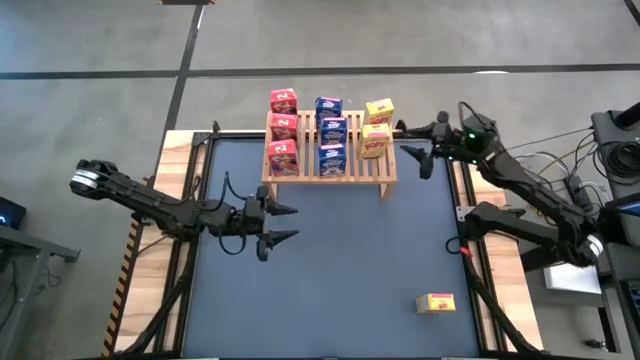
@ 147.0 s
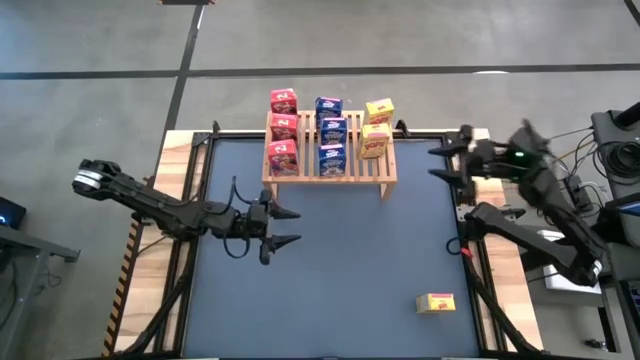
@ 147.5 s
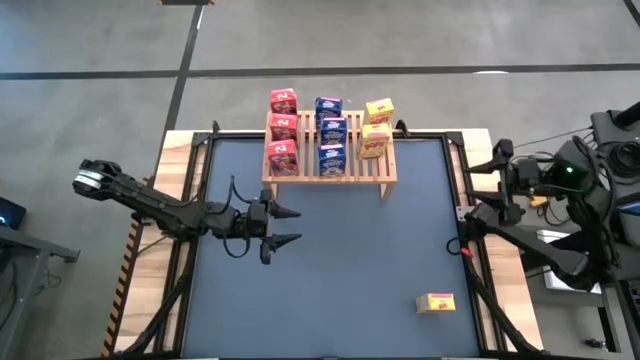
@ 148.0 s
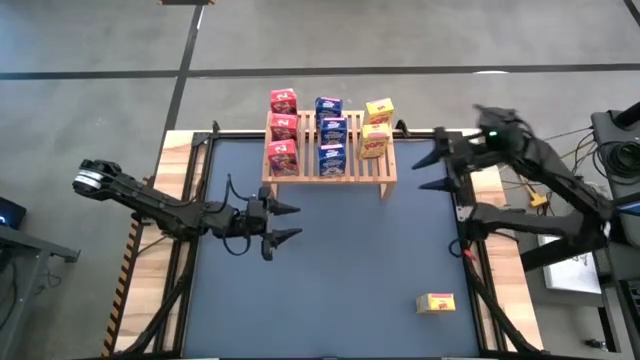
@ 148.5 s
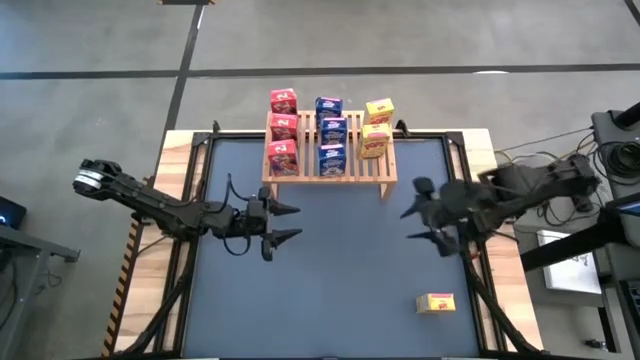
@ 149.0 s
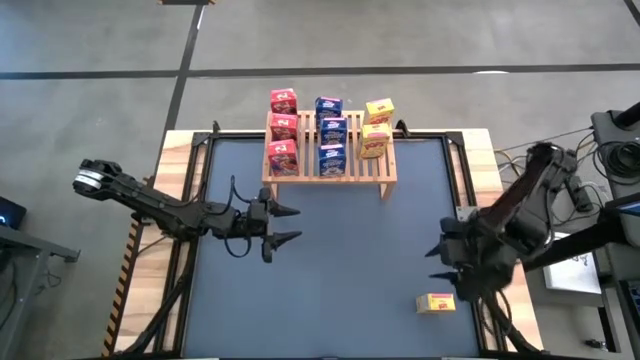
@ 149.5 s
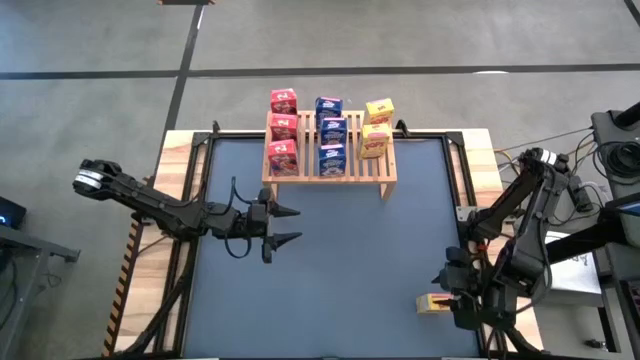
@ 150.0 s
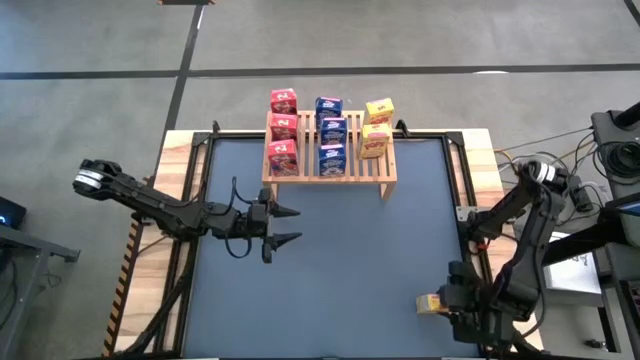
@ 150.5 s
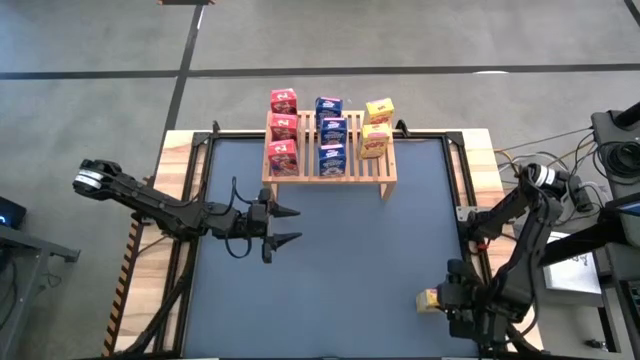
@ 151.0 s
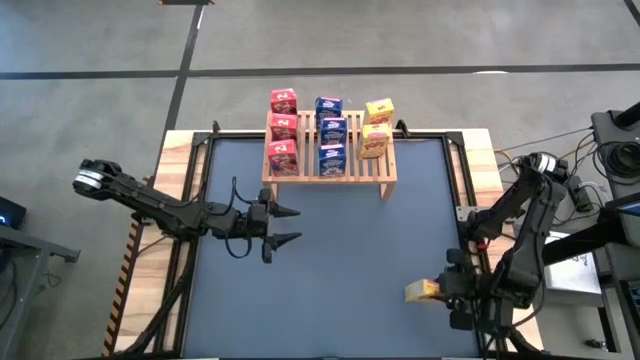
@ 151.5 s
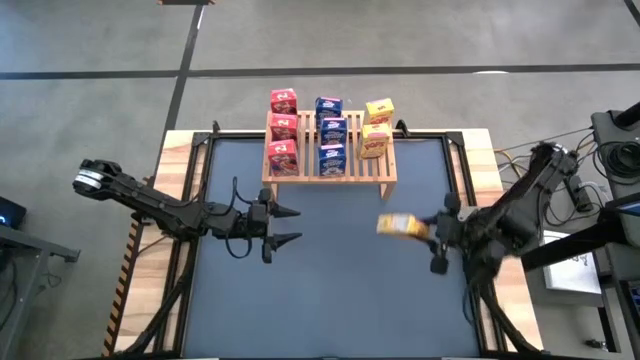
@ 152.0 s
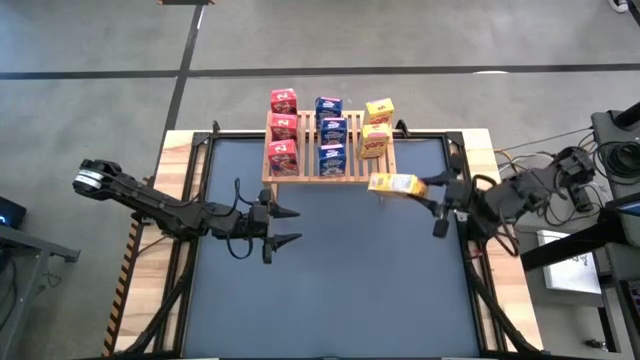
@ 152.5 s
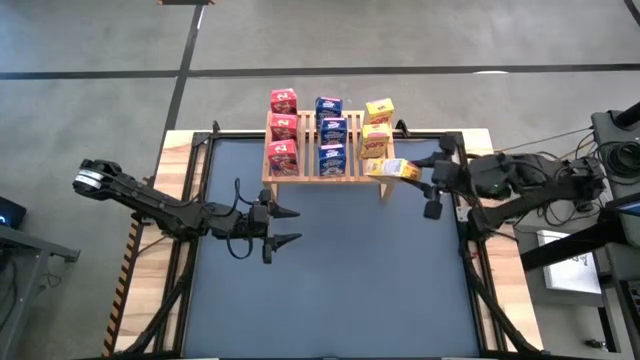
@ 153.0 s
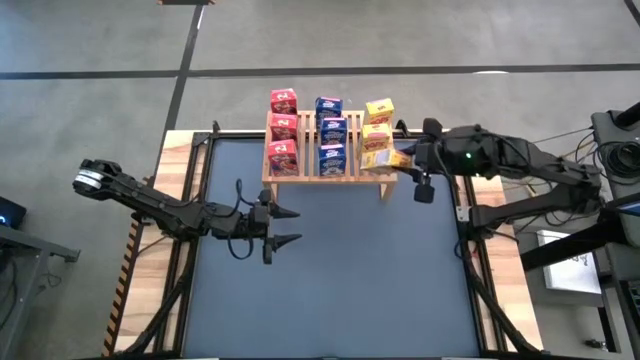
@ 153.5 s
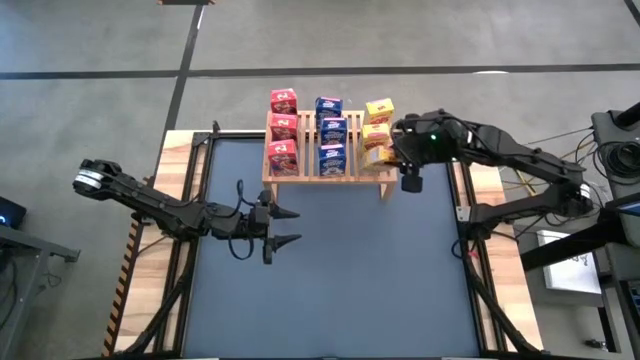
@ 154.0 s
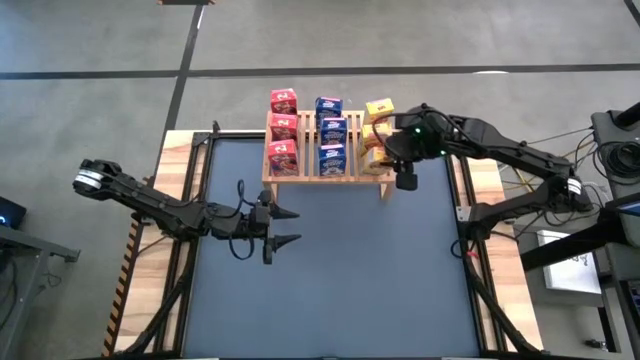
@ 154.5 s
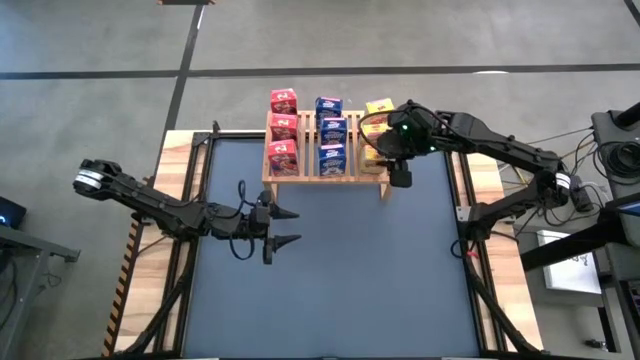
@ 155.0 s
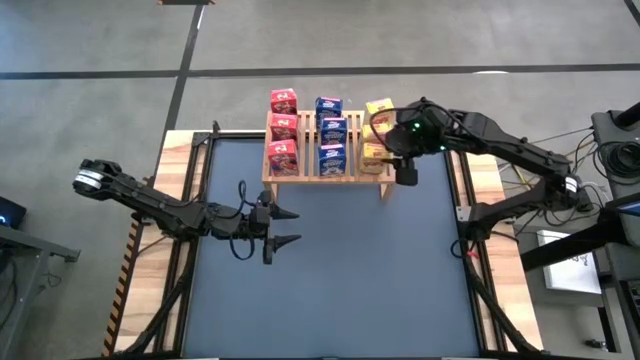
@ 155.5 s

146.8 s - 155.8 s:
Task: Stack cereal on shelf
Put the yellow cereal box aligned with the other yellow cereal boxes on the shelf

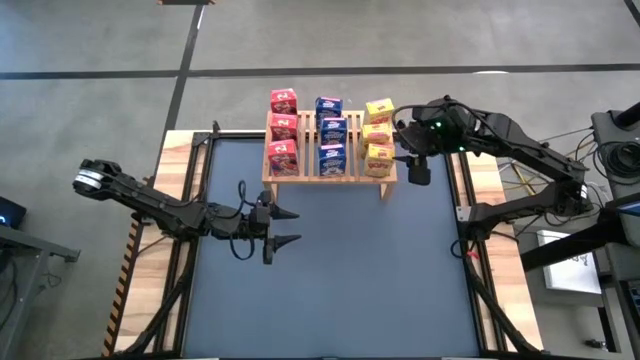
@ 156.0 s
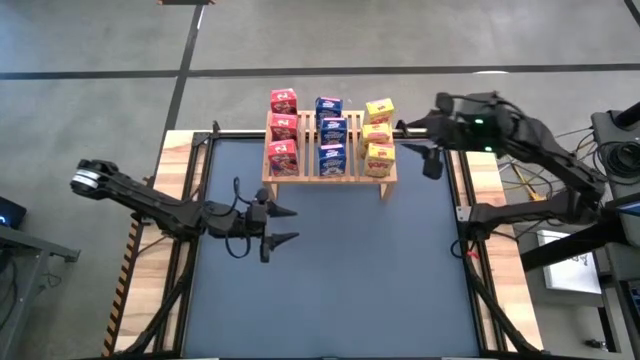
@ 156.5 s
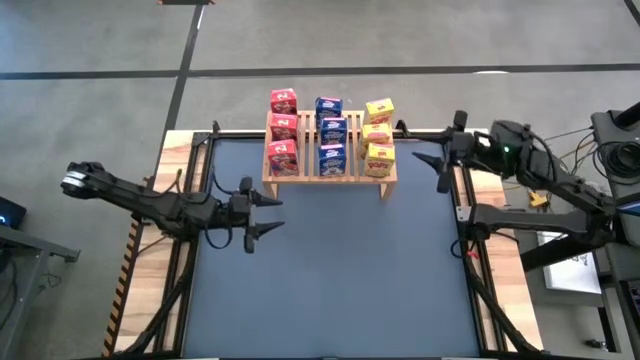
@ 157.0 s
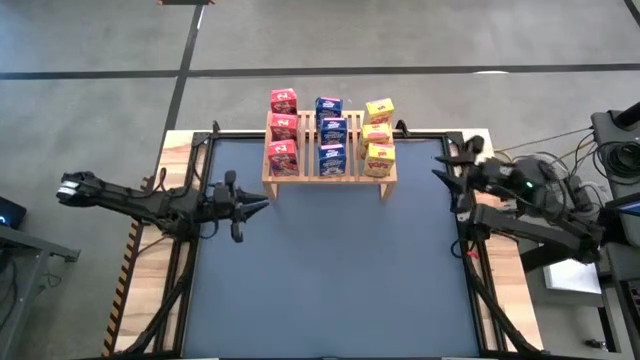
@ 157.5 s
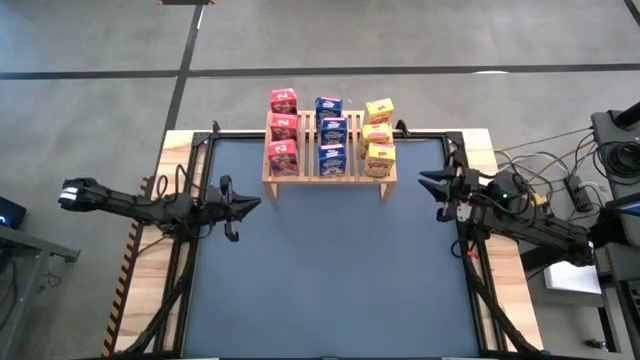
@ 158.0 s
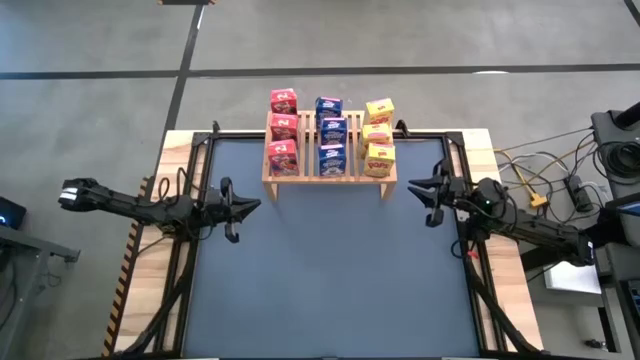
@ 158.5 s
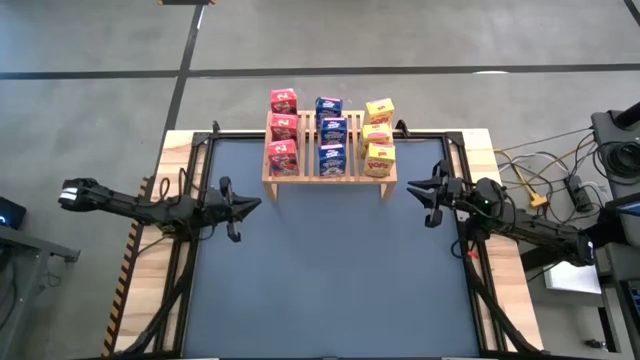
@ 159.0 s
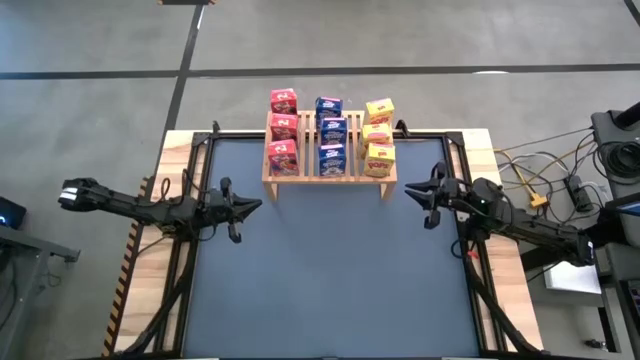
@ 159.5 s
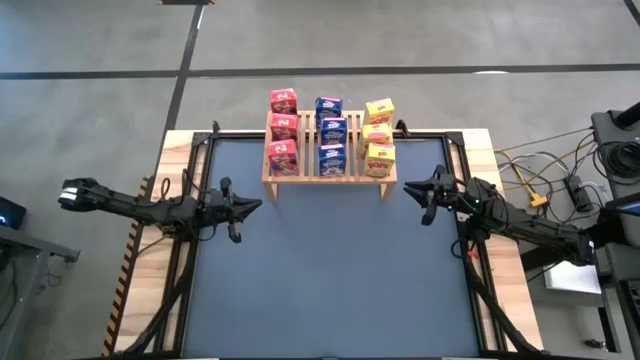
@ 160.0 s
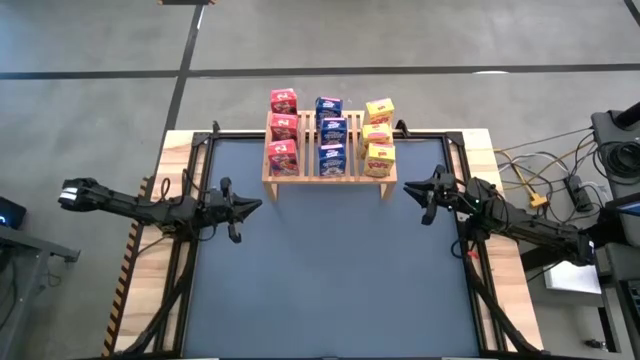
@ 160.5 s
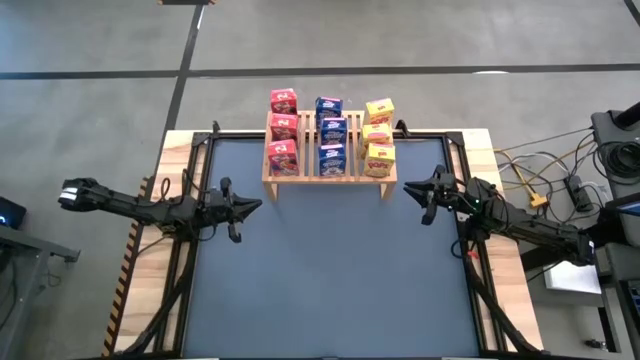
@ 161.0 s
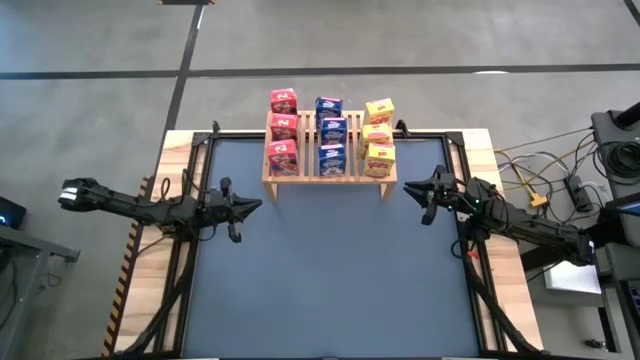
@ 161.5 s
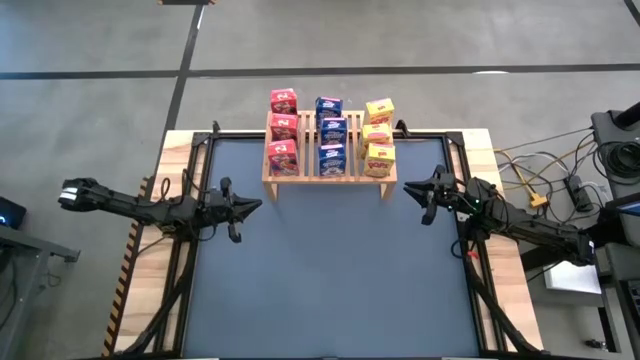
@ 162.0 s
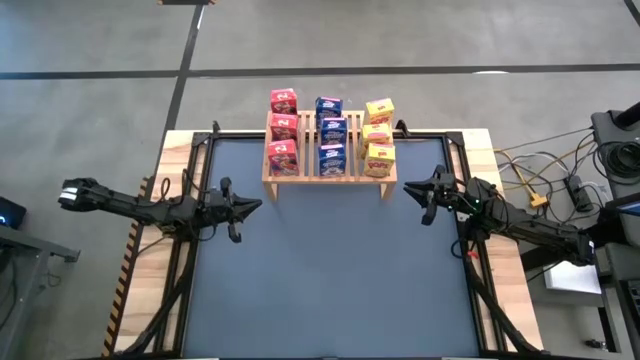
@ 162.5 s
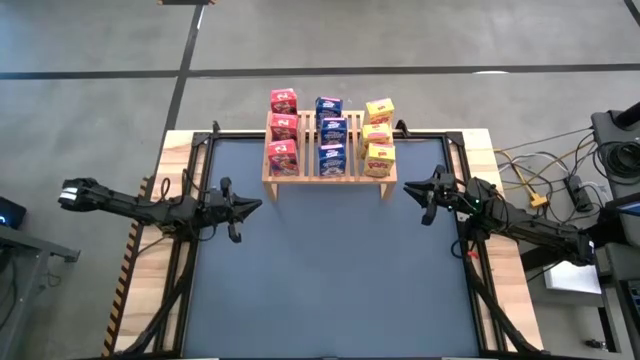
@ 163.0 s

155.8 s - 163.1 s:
Return to Home Position

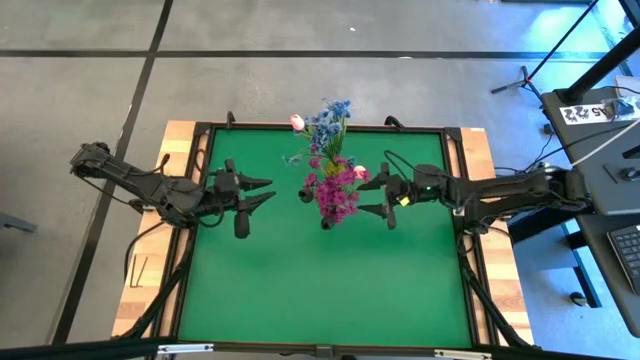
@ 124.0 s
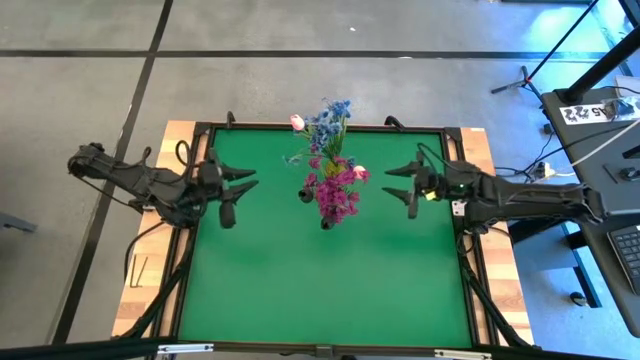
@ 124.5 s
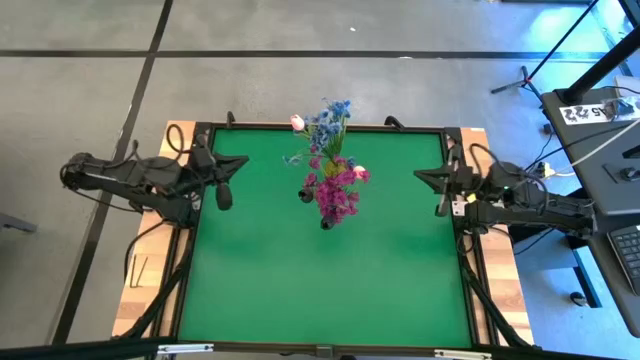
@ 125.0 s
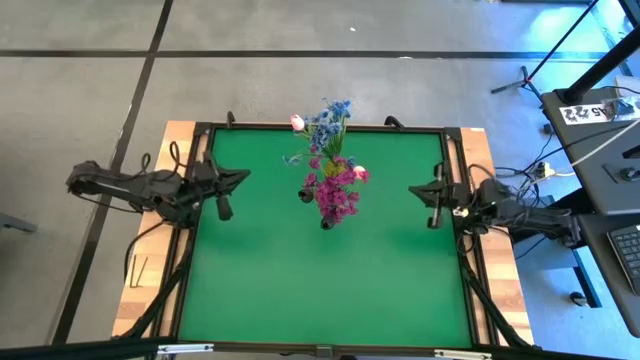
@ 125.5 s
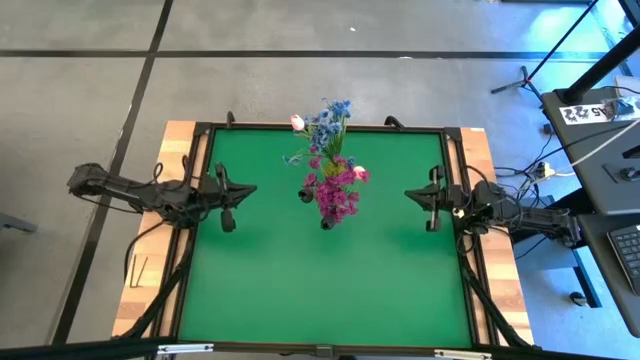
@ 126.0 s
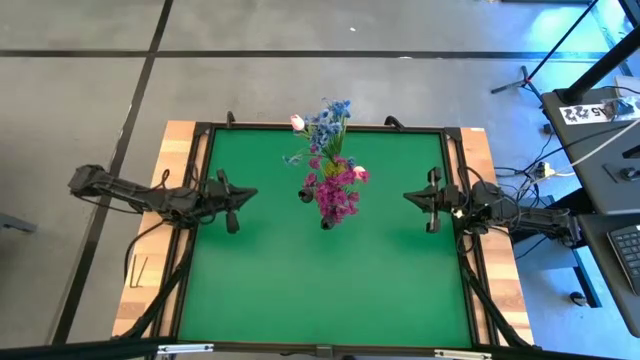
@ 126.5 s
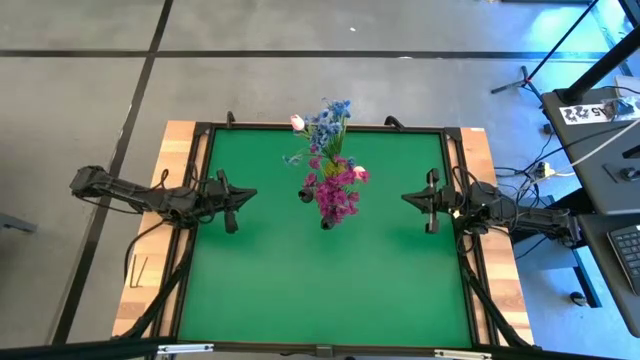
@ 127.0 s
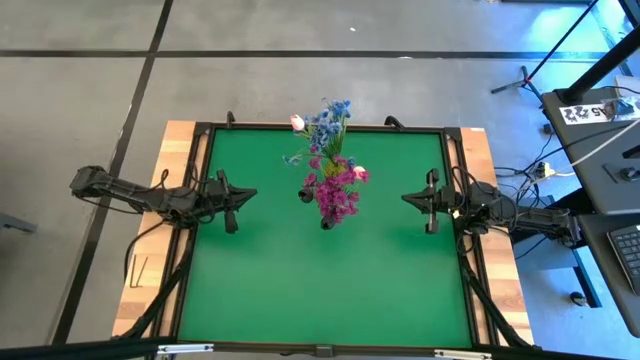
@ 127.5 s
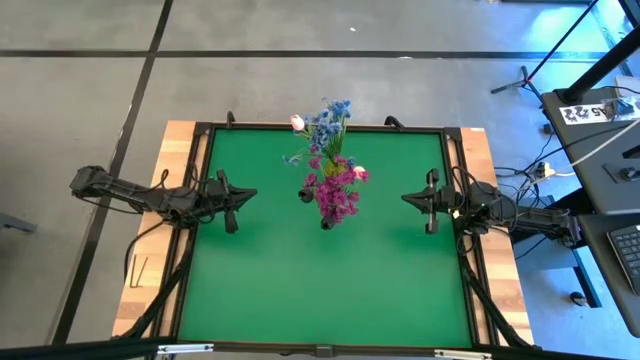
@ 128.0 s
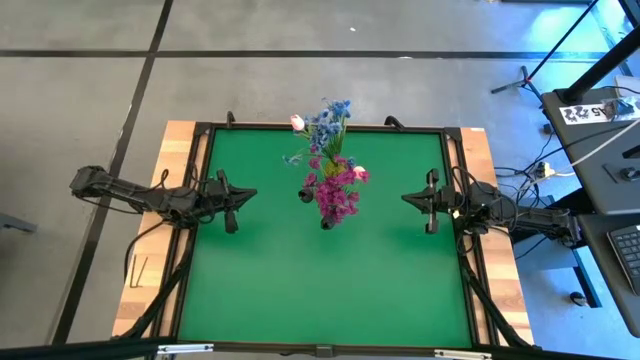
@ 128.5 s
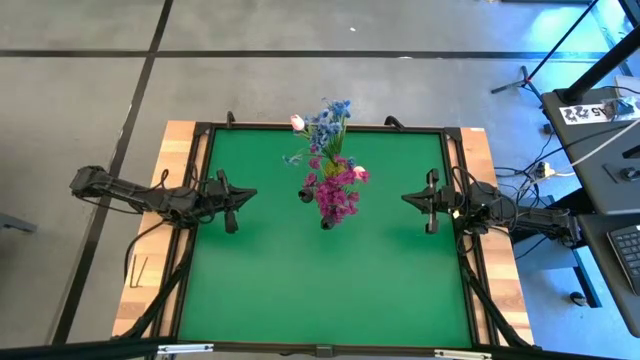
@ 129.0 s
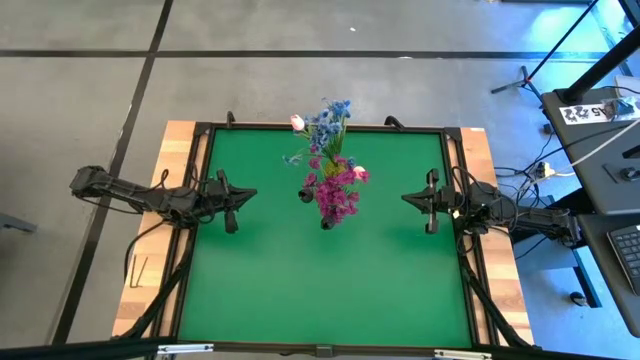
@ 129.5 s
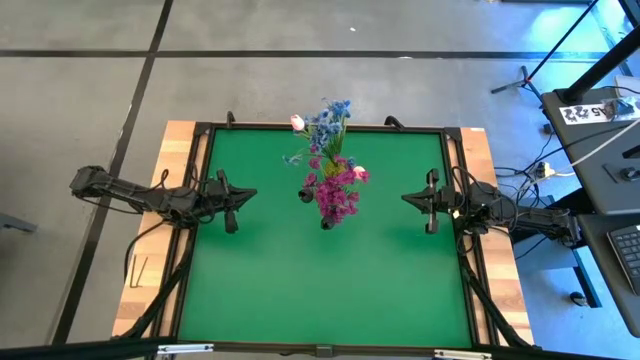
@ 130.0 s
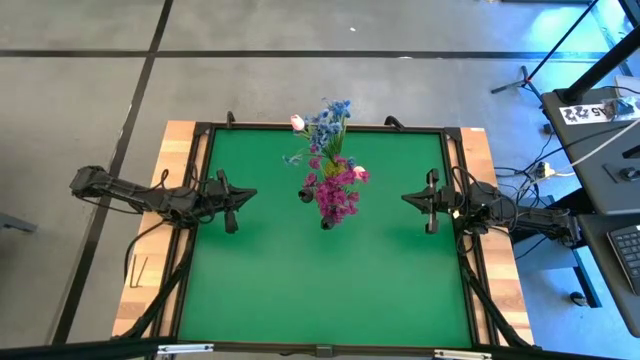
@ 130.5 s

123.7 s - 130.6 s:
Task: Sort flowers into vase by color
Return to Home Position
